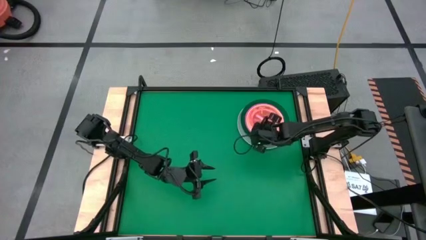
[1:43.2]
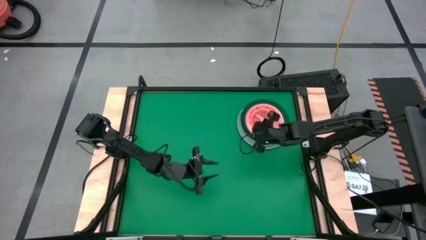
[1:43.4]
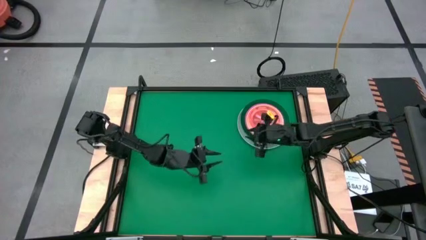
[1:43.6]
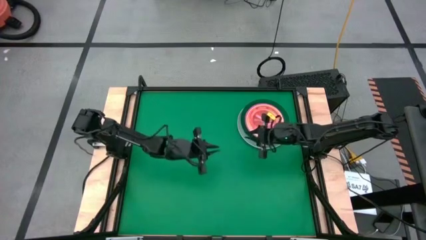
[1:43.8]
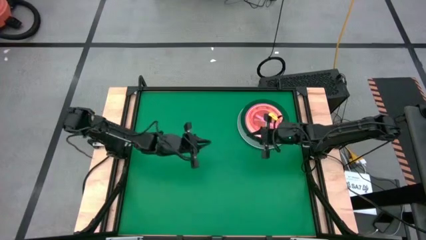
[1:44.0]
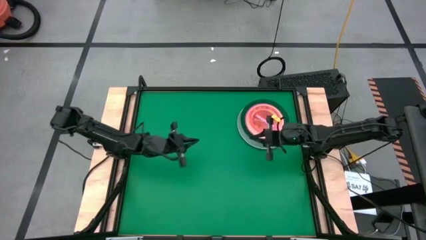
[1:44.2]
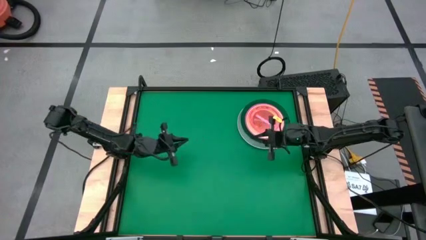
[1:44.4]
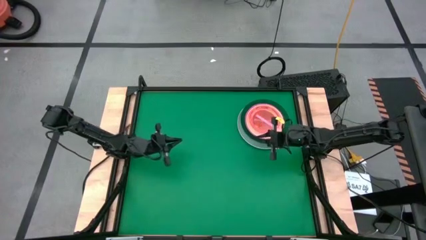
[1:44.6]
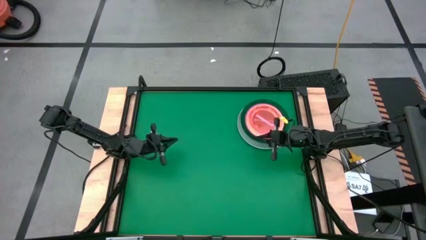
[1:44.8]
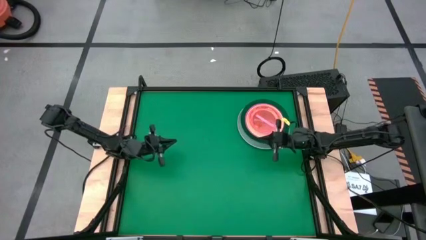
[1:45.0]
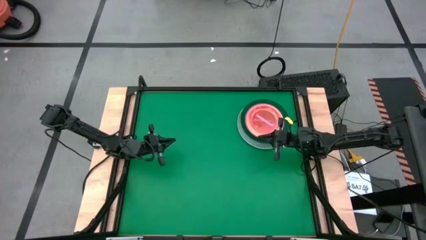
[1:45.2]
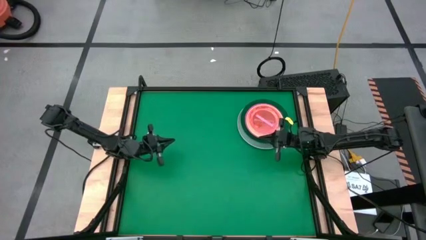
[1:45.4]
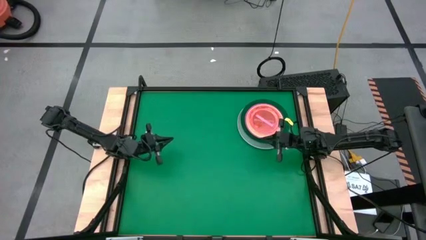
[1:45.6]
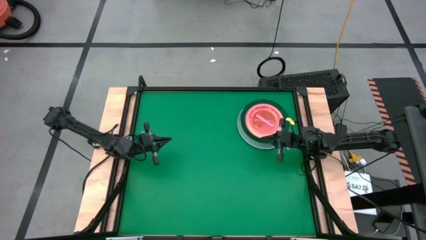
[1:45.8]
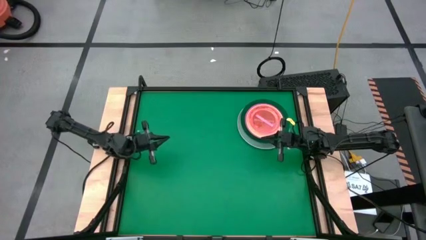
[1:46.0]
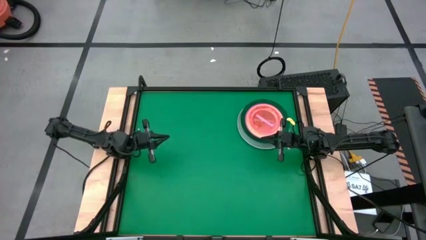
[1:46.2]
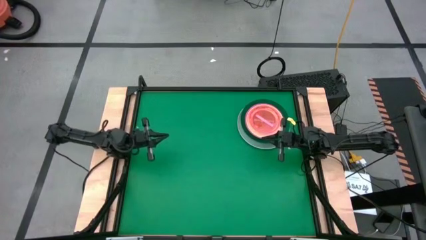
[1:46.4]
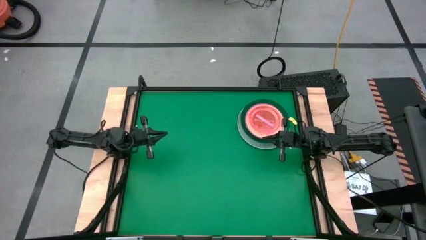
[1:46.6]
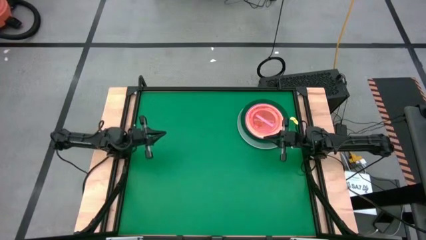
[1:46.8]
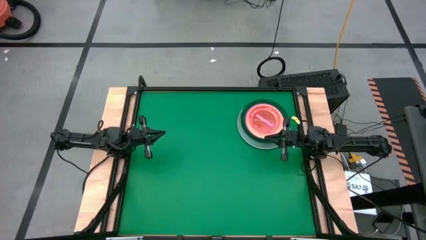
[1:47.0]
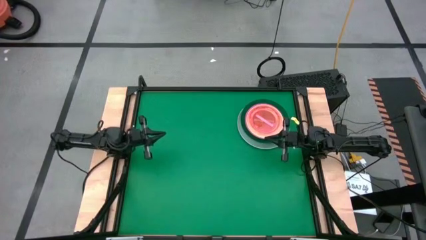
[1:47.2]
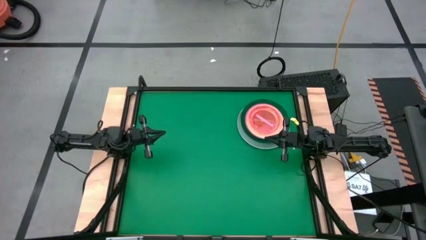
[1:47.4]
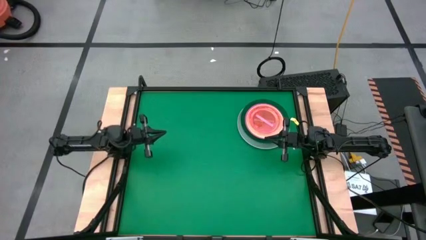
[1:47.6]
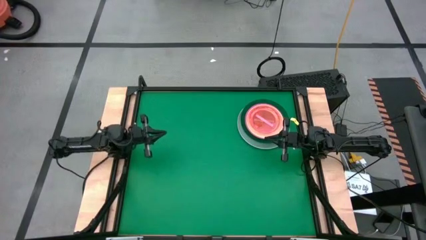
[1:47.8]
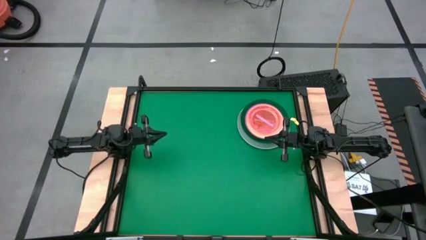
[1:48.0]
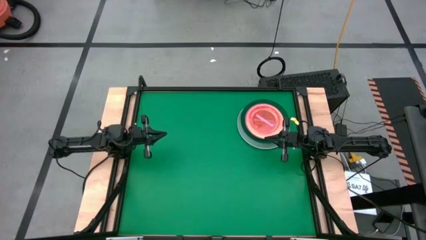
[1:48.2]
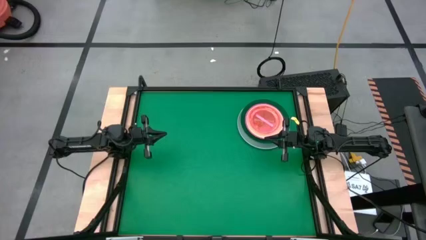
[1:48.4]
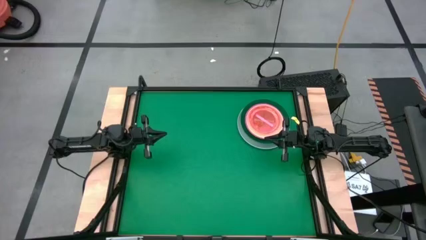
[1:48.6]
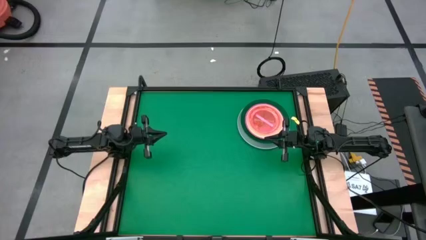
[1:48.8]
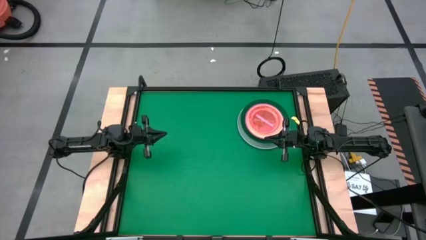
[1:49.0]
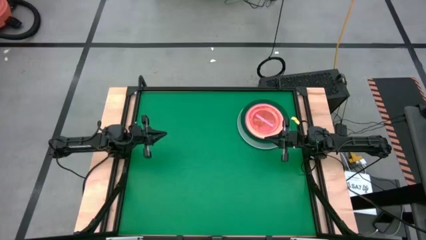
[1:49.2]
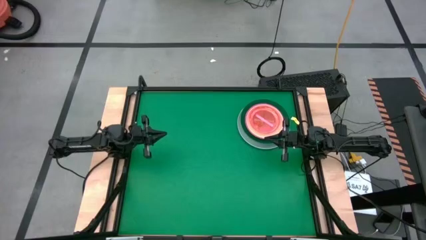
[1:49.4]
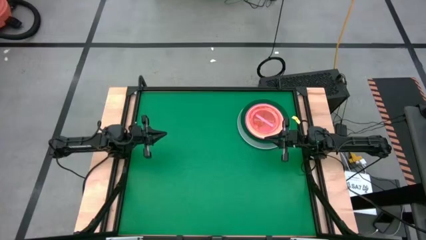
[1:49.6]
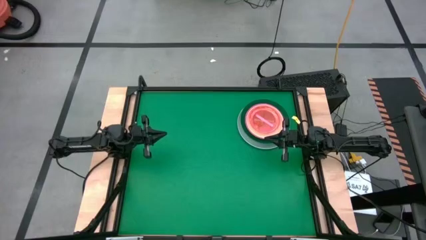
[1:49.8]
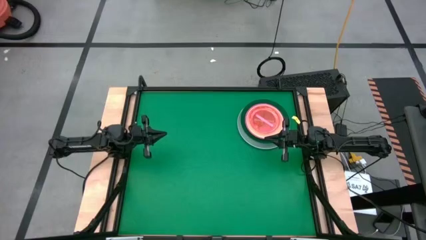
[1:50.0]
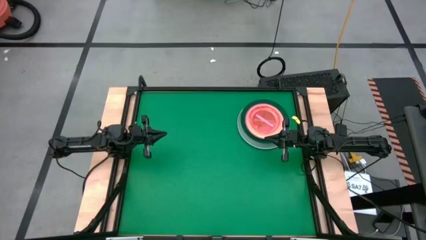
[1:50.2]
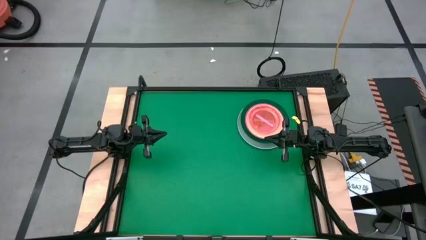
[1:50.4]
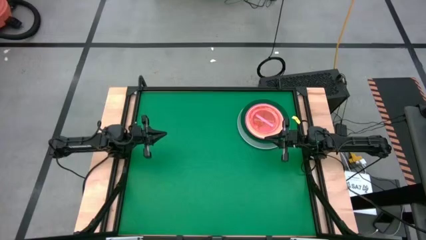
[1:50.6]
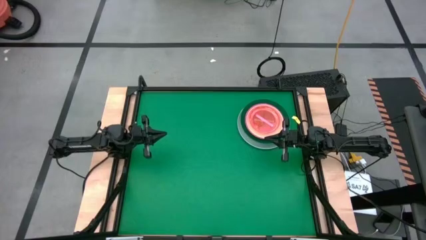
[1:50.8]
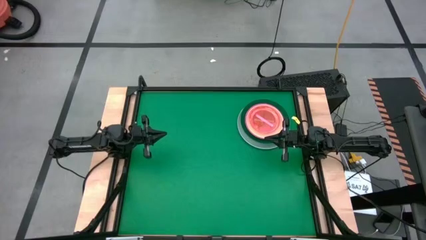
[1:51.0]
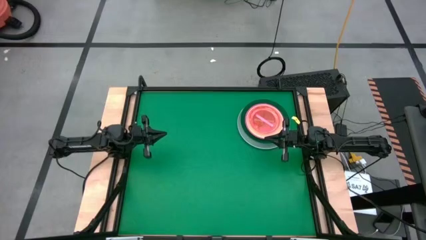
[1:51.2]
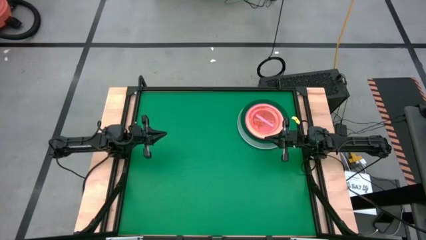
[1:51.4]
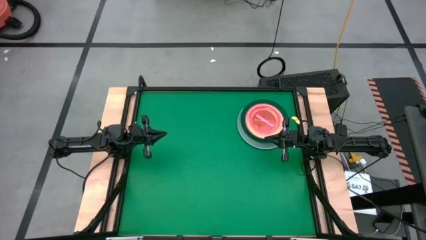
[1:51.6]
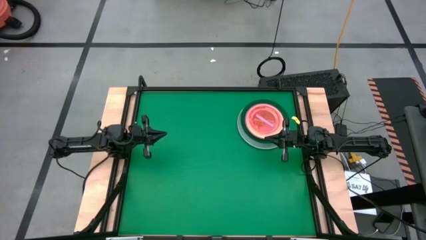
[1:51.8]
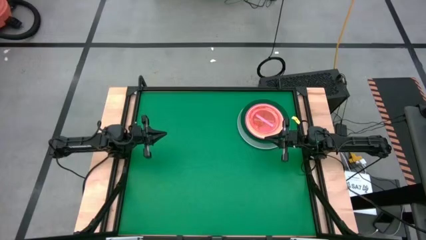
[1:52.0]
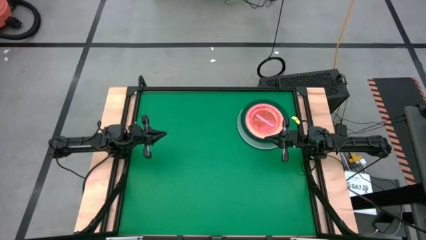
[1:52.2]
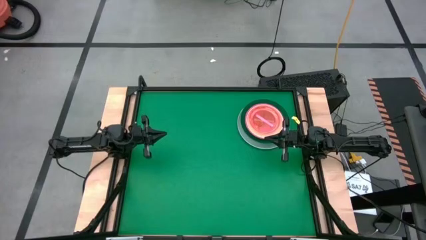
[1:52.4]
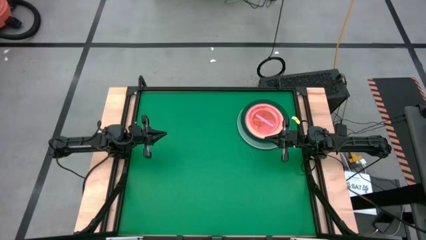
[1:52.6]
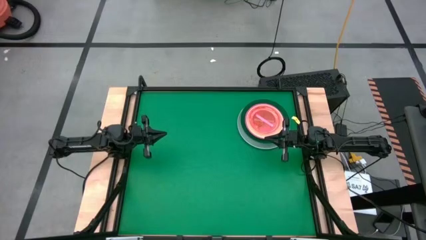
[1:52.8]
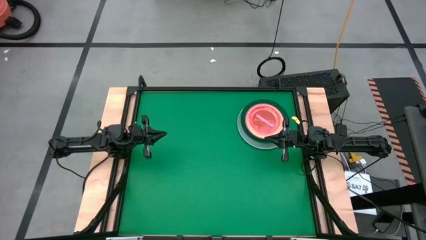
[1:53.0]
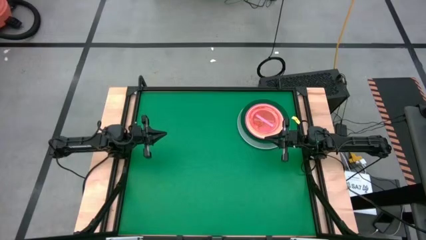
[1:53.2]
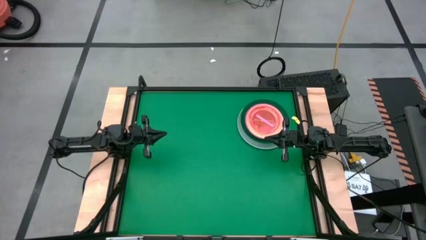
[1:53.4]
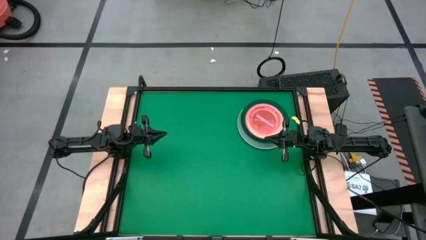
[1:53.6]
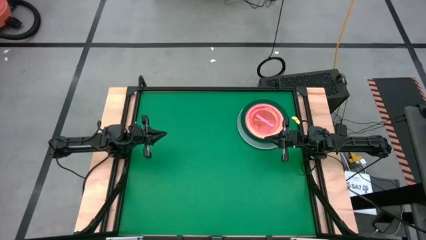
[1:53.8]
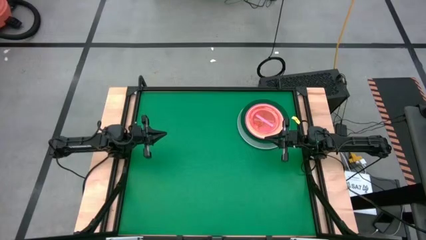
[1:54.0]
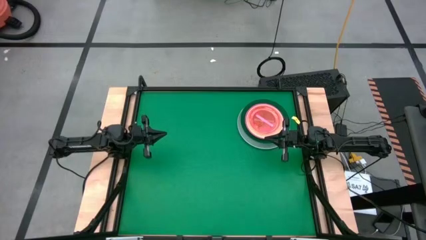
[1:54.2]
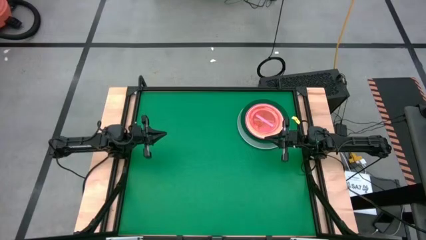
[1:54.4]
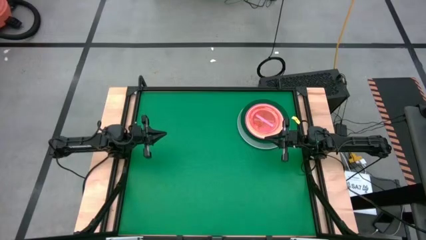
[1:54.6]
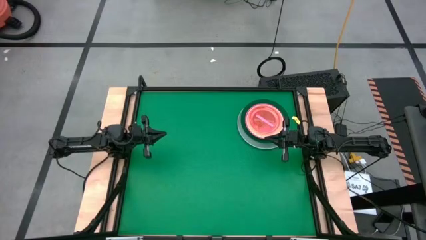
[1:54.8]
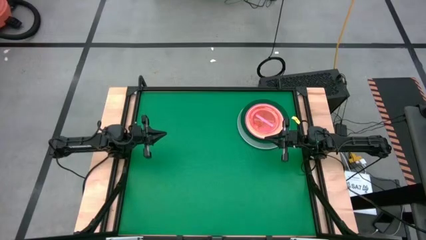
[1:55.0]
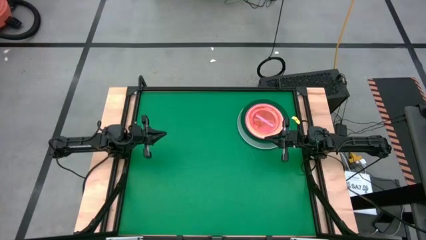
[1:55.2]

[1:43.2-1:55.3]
Task: Stack plastic plates
Return to home position
